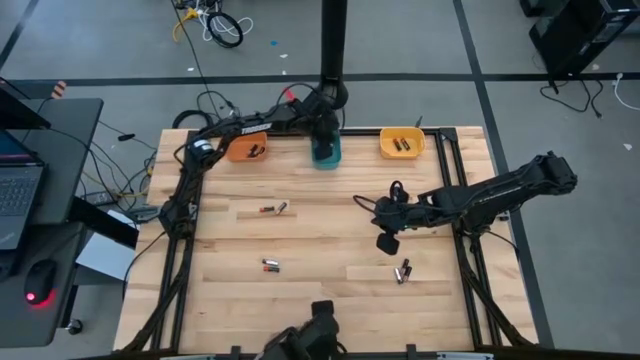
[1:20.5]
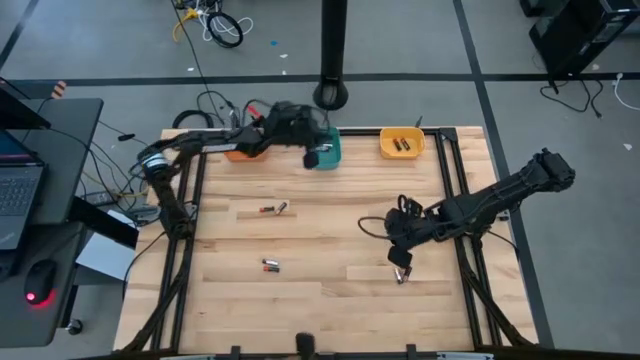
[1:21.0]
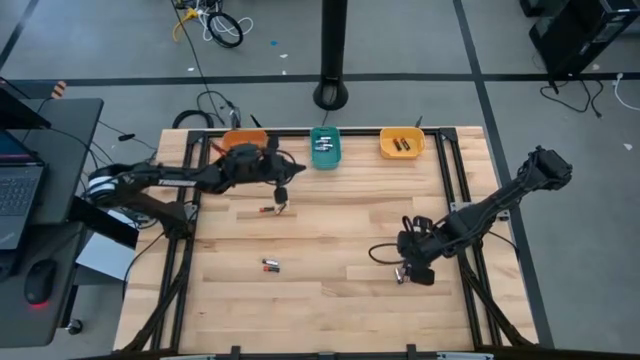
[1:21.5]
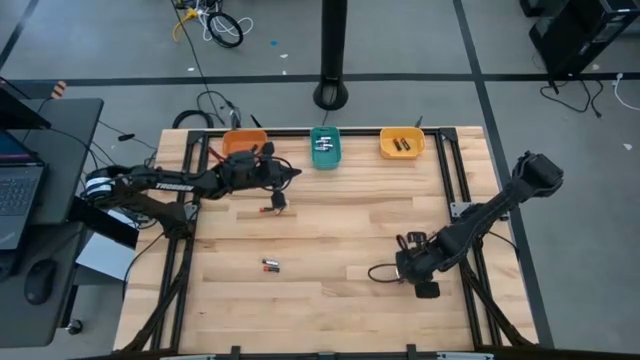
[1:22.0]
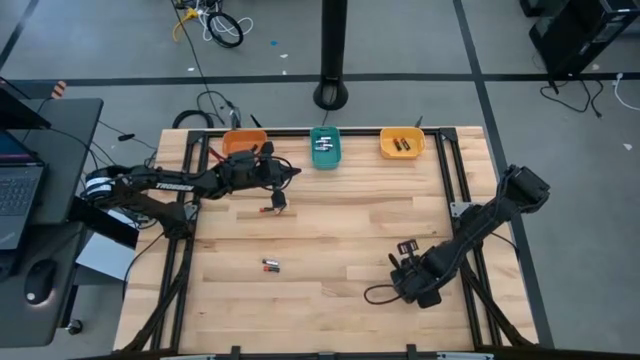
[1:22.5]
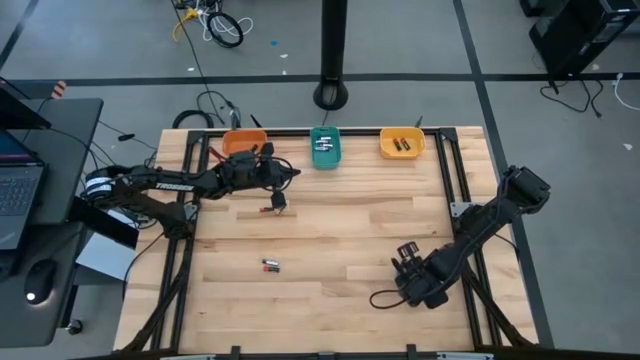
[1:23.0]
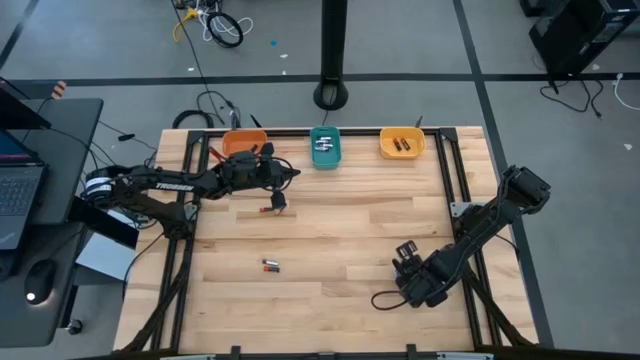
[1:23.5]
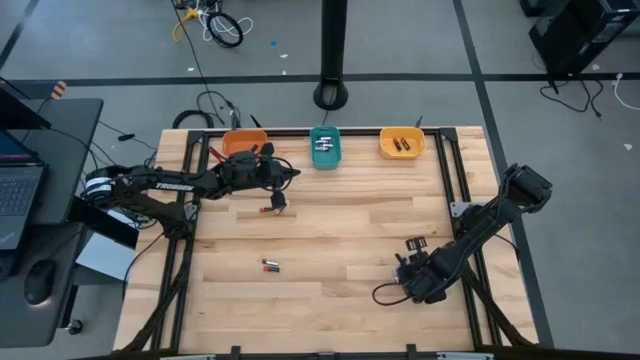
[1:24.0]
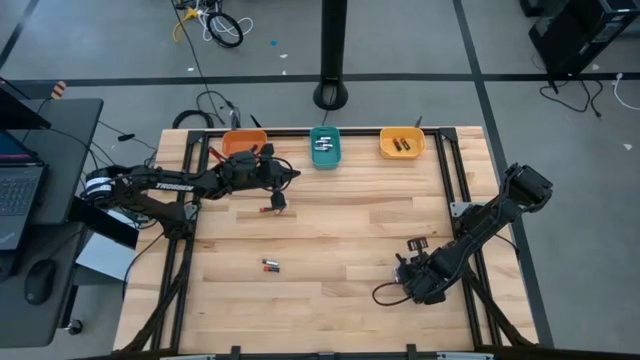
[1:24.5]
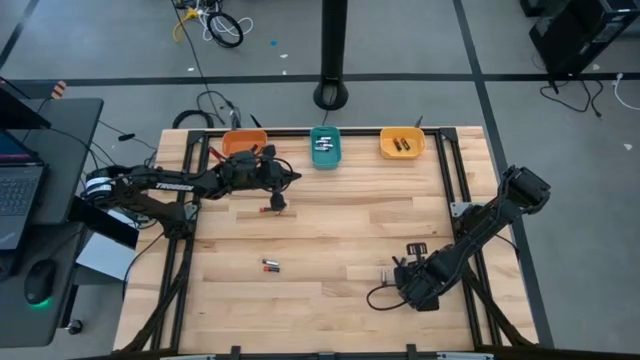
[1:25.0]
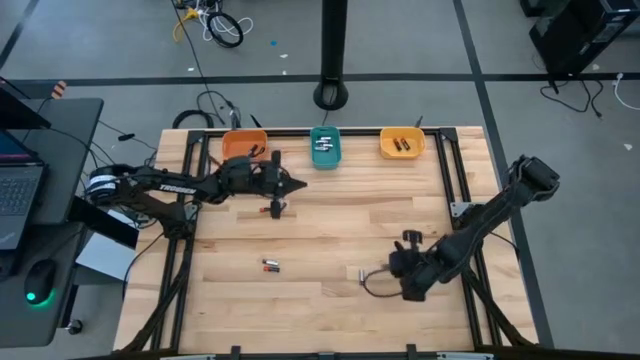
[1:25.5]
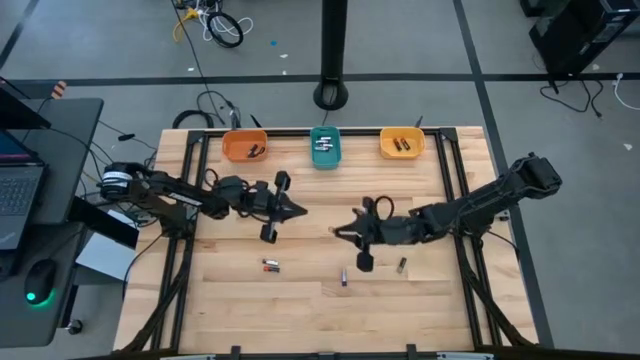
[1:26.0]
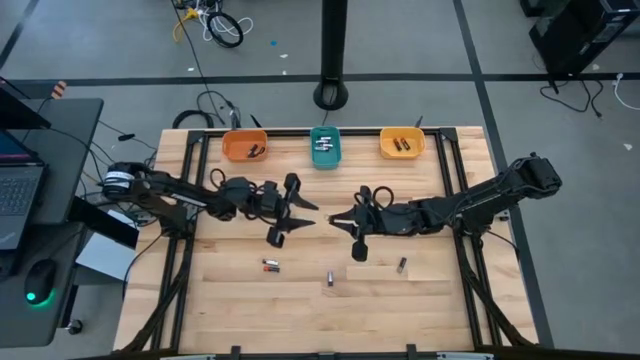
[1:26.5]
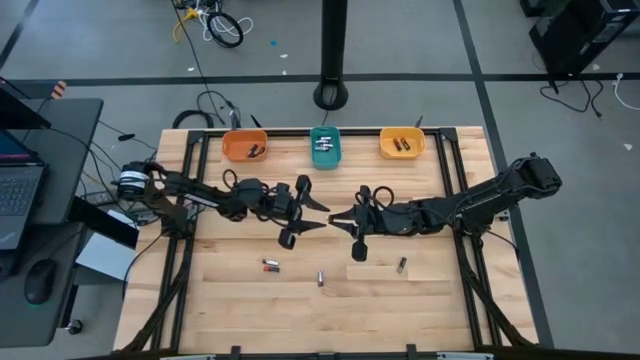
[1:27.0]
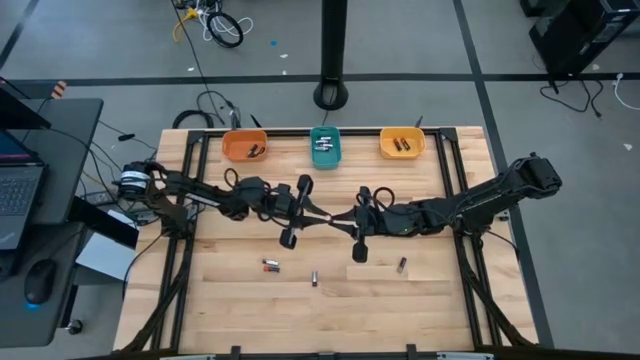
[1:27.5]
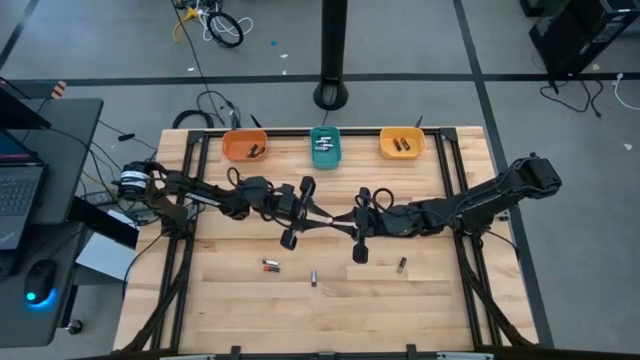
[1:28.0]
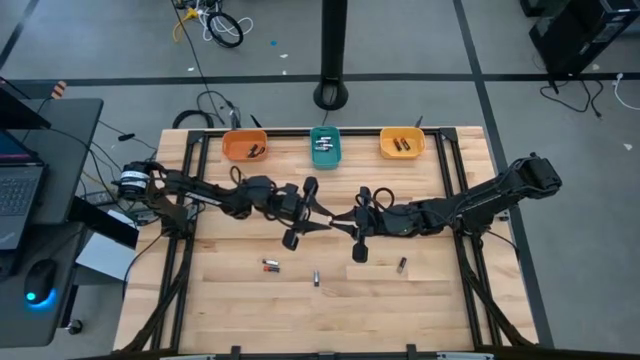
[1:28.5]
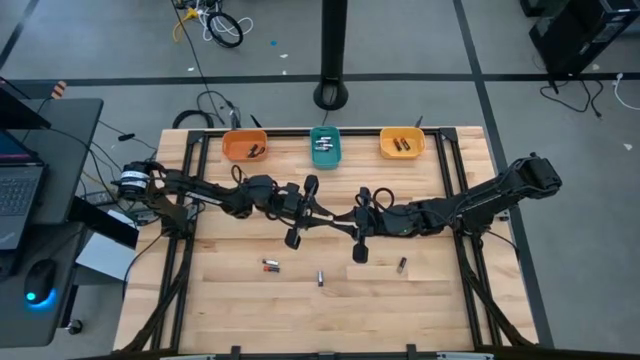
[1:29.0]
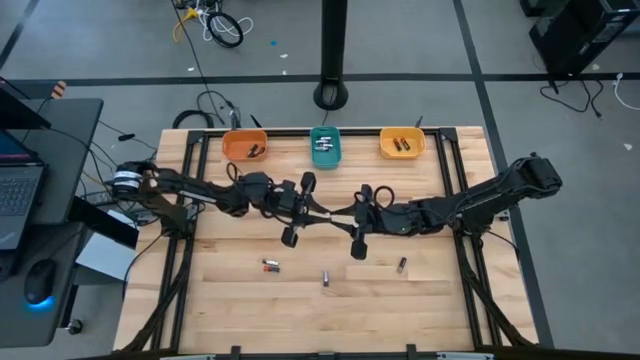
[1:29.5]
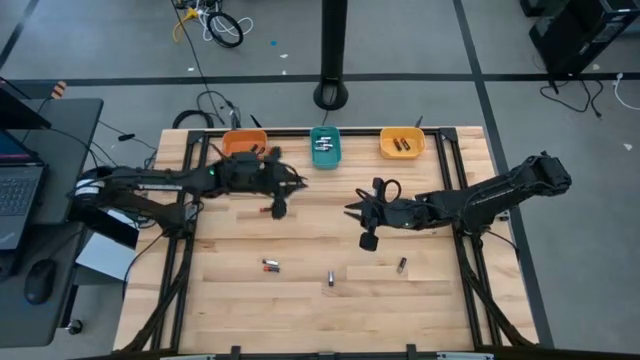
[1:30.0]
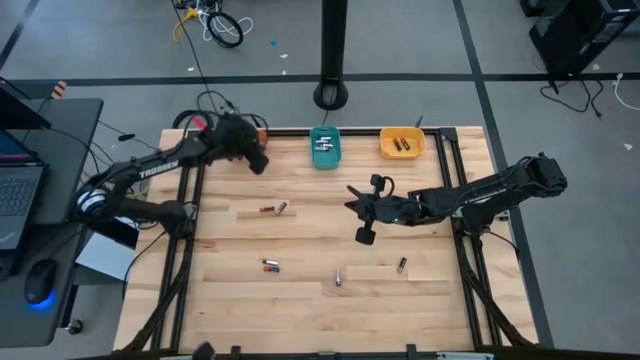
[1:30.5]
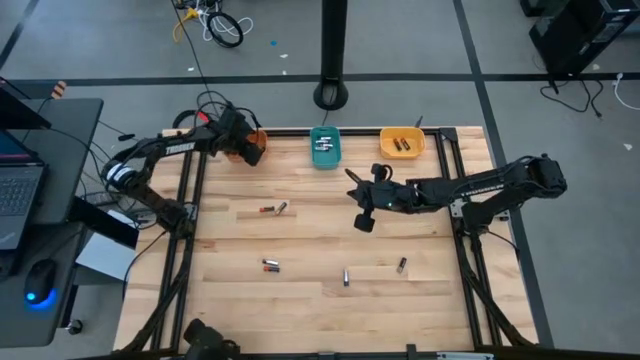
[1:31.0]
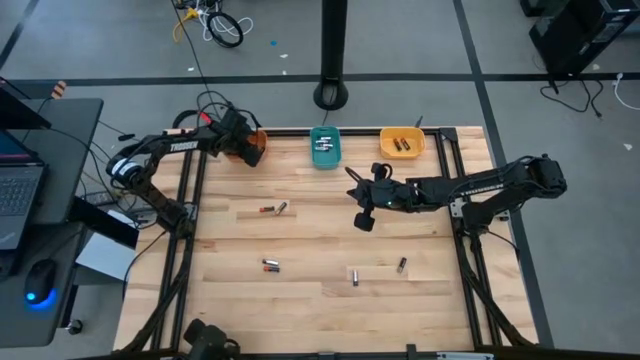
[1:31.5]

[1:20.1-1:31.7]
Task: Sort batteries
Put the brown-black battery in the orange bin

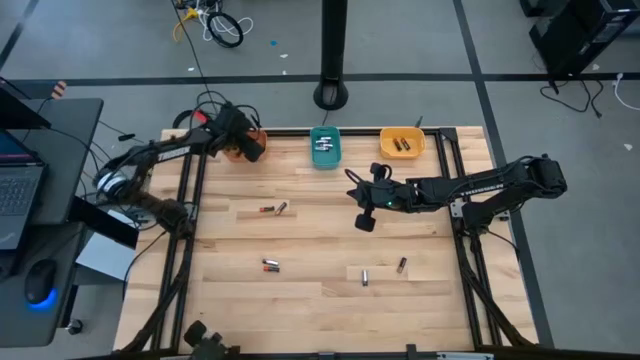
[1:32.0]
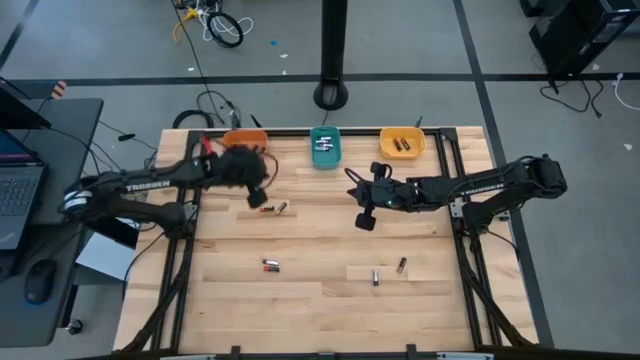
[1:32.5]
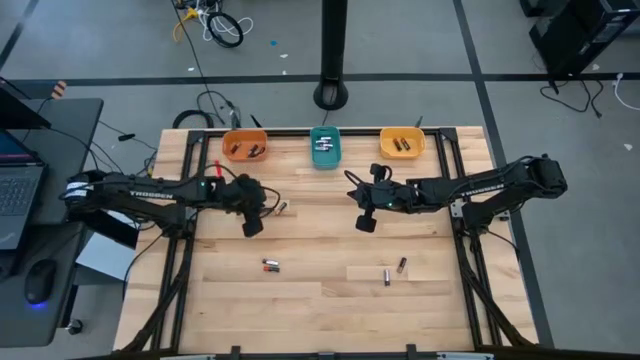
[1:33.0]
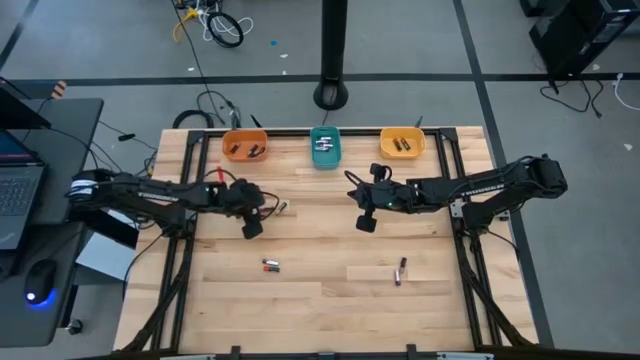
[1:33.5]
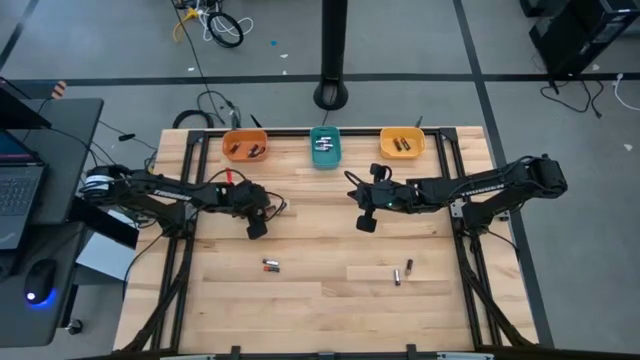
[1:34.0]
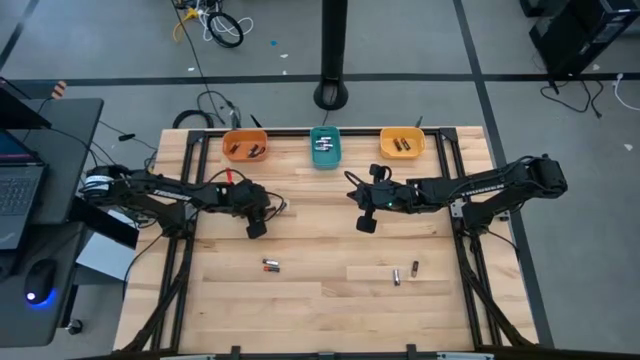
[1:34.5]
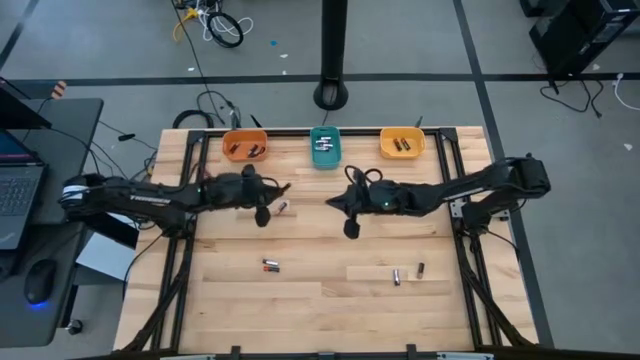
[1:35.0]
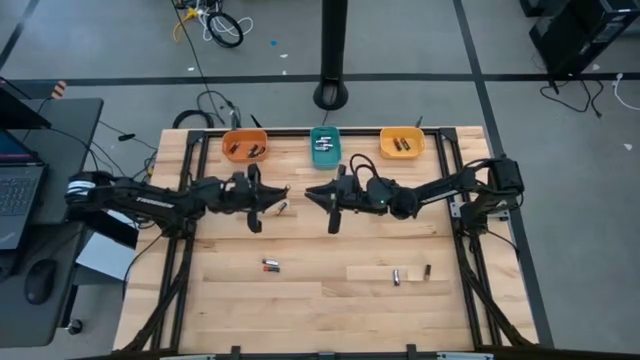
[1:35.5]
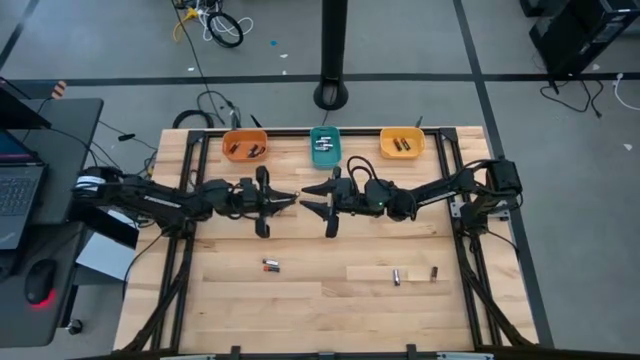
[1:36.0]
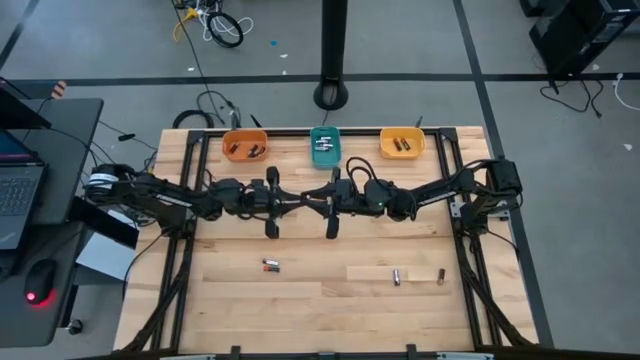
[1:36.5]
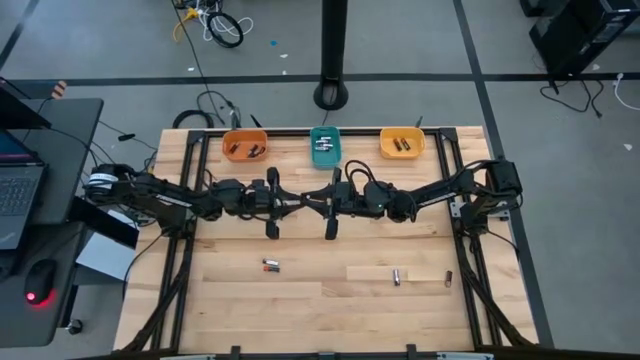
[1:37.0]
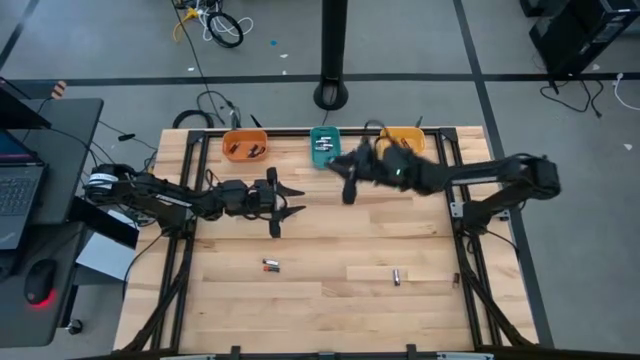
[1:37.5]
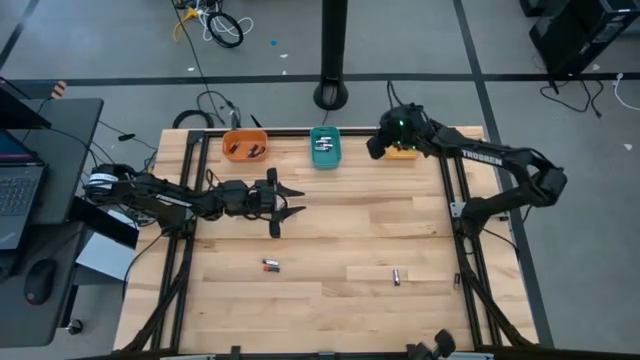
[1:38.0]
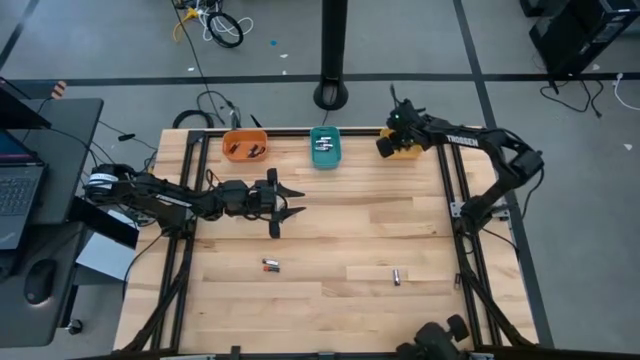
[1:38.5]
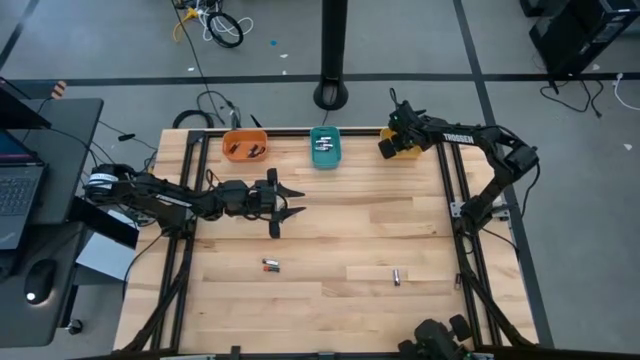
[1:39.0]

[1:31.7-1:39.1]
Put the red-black battery in the yellow bin
